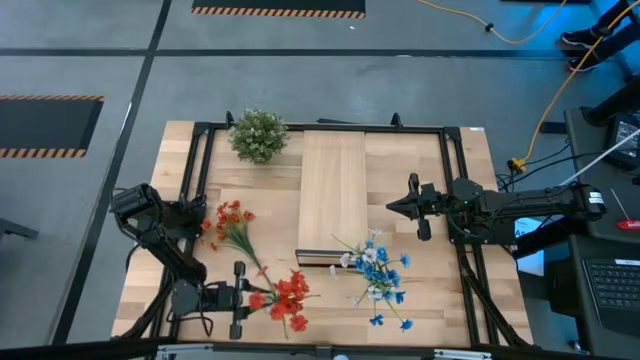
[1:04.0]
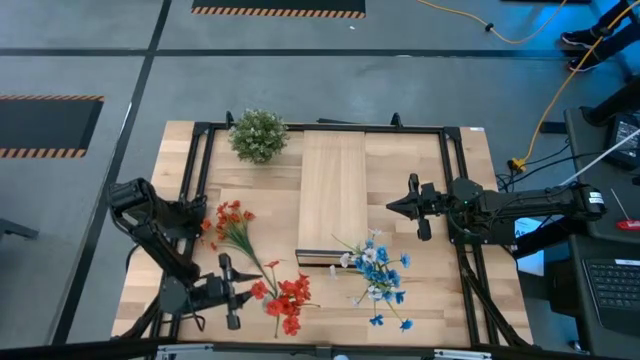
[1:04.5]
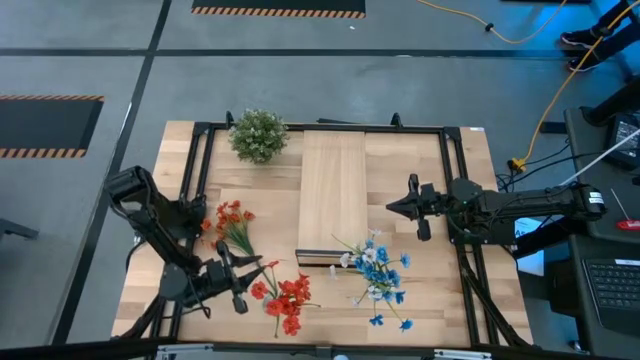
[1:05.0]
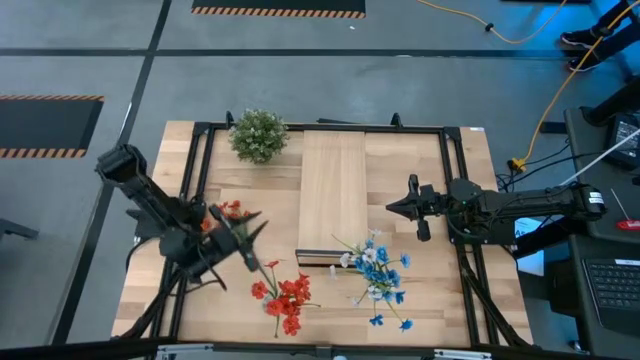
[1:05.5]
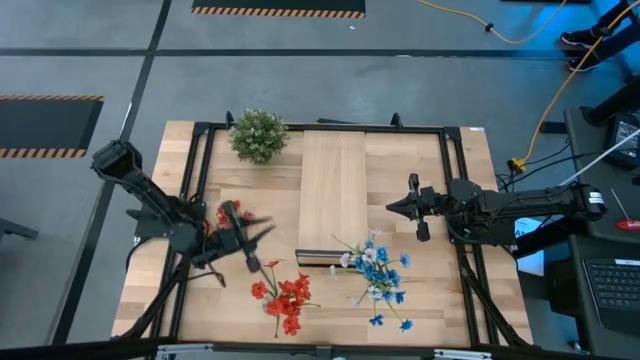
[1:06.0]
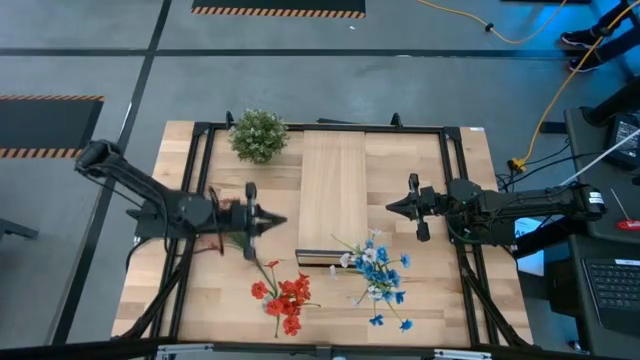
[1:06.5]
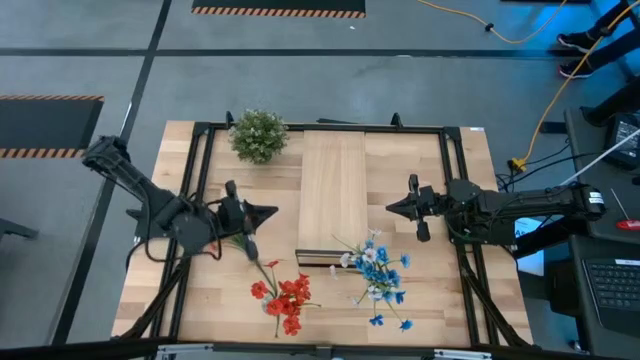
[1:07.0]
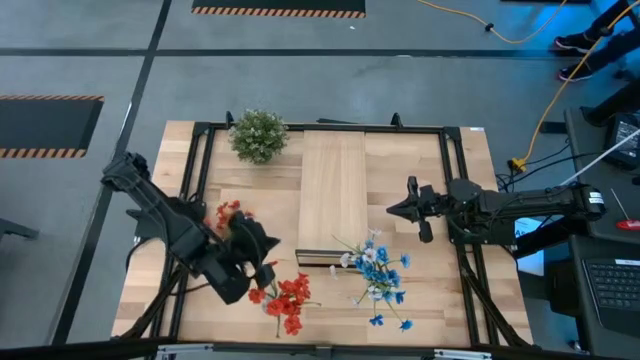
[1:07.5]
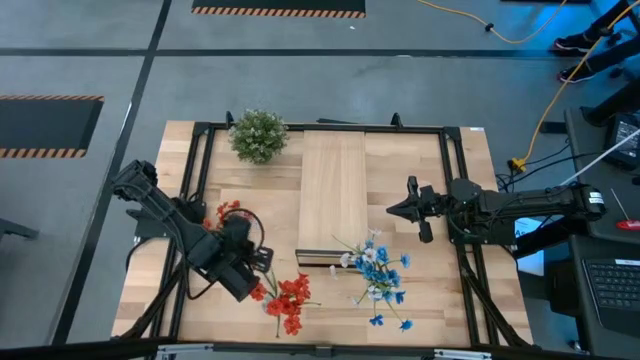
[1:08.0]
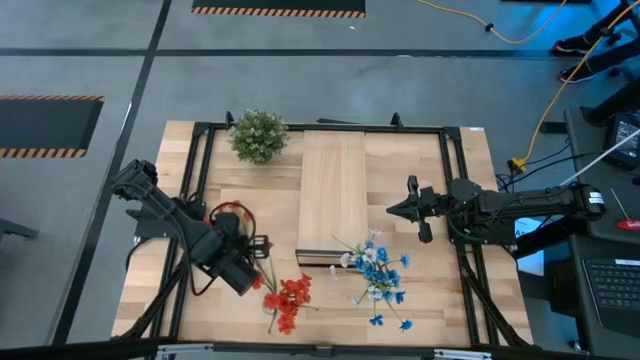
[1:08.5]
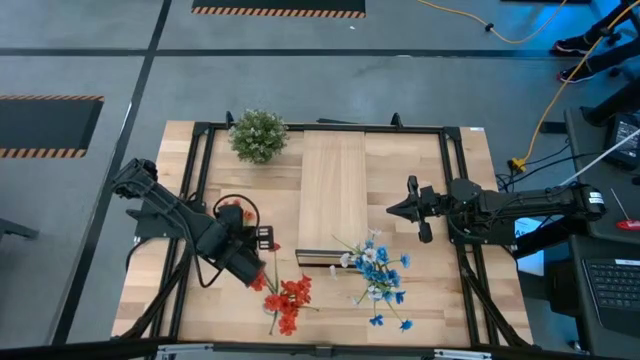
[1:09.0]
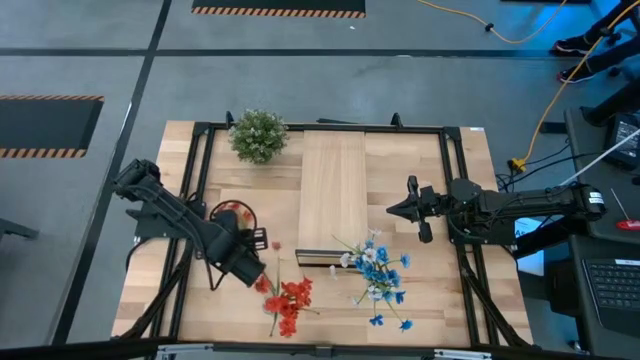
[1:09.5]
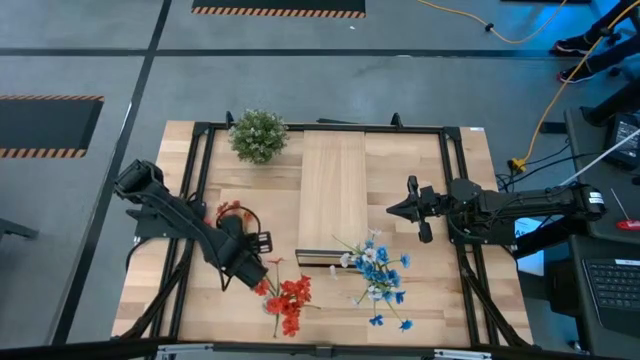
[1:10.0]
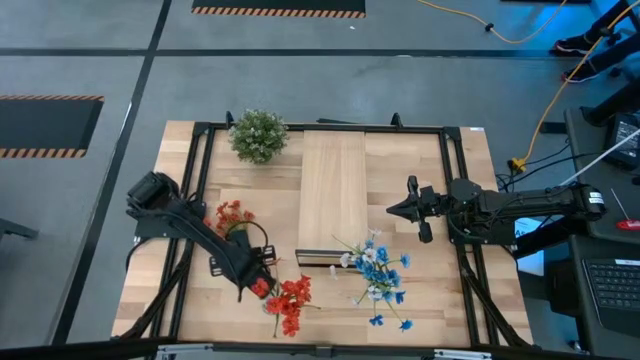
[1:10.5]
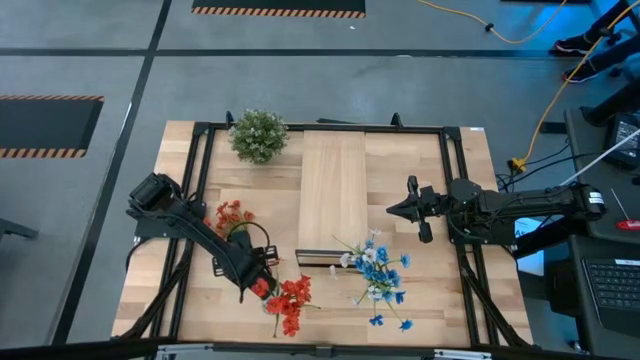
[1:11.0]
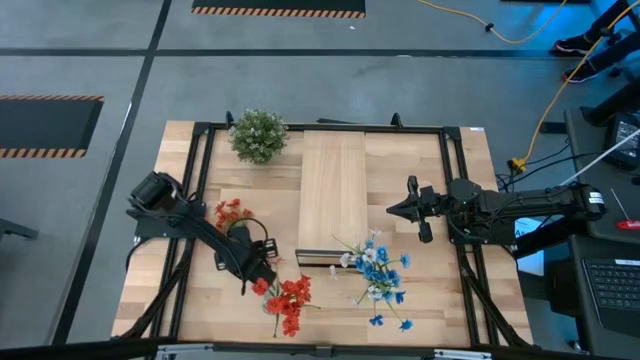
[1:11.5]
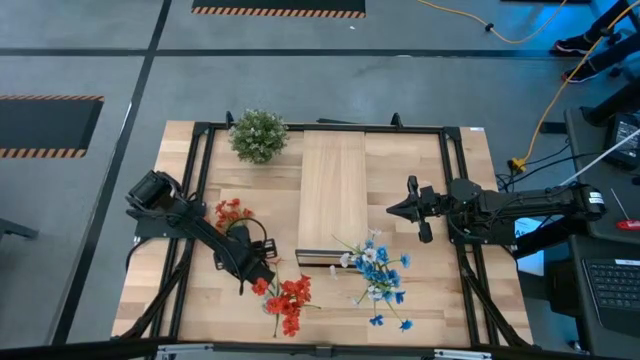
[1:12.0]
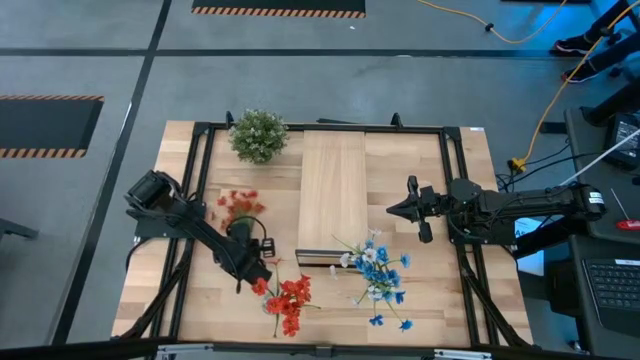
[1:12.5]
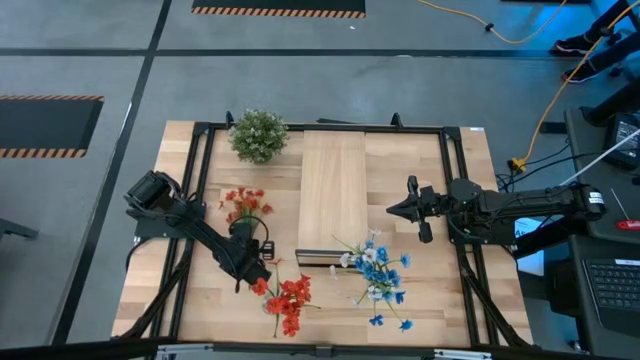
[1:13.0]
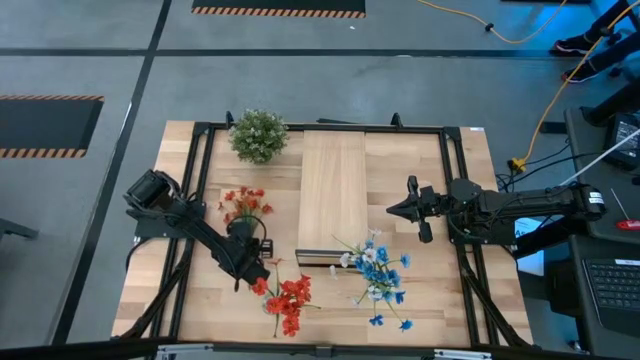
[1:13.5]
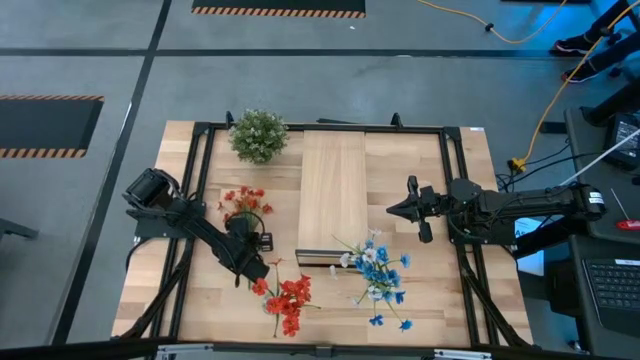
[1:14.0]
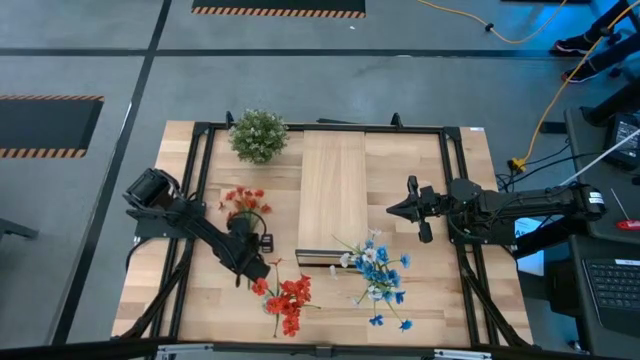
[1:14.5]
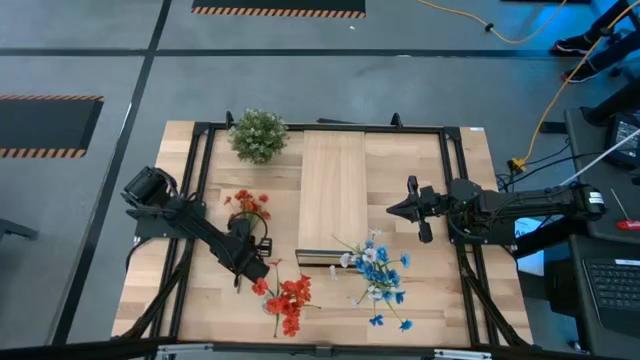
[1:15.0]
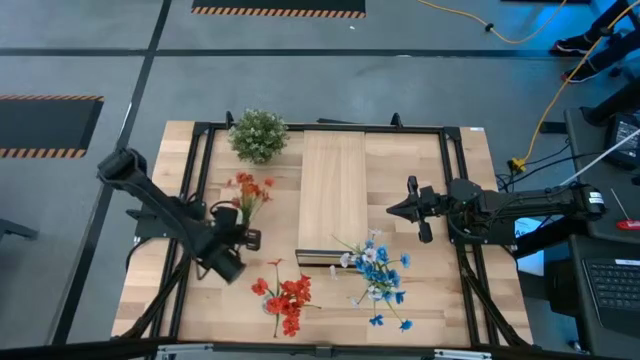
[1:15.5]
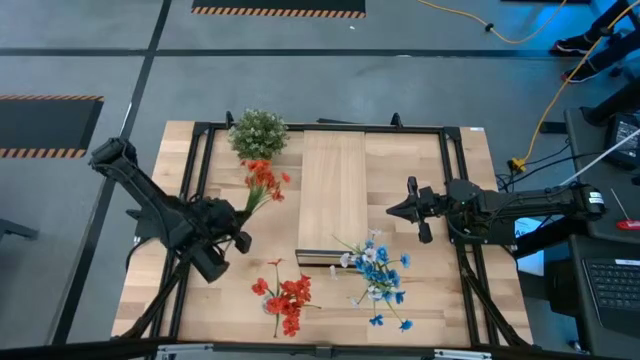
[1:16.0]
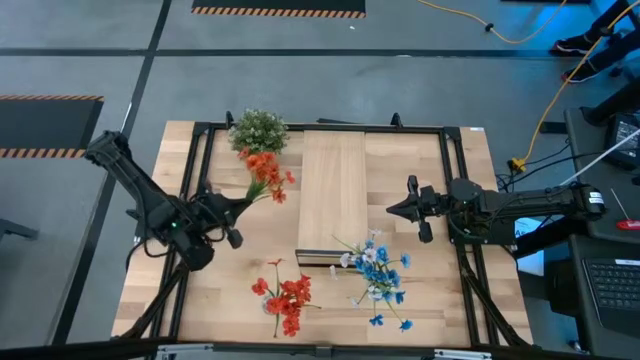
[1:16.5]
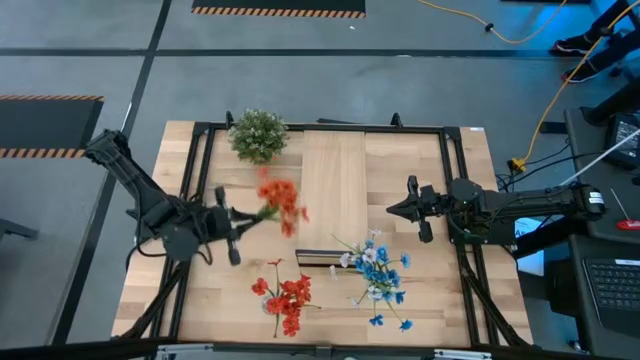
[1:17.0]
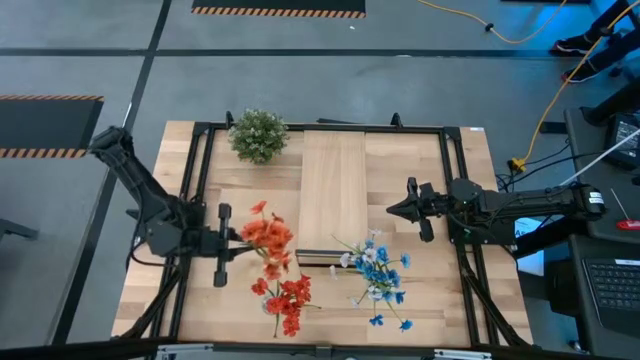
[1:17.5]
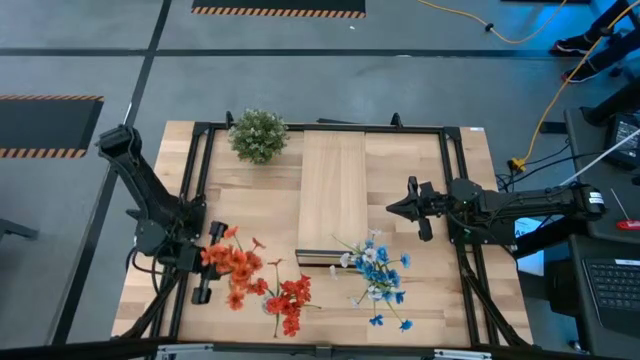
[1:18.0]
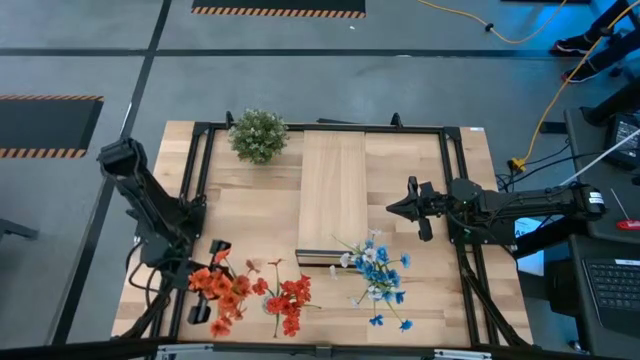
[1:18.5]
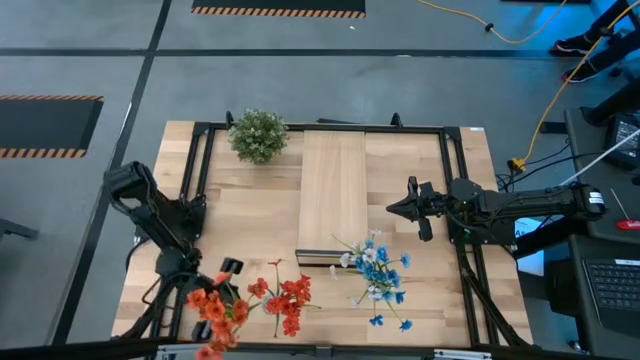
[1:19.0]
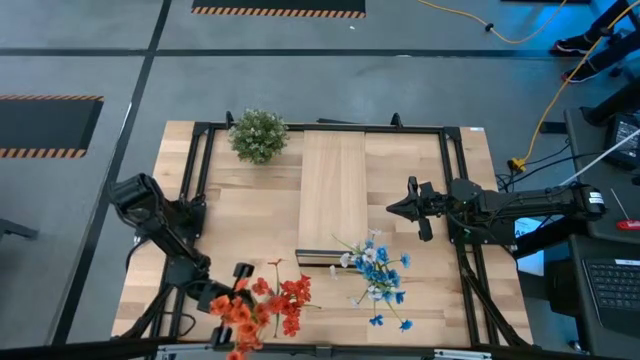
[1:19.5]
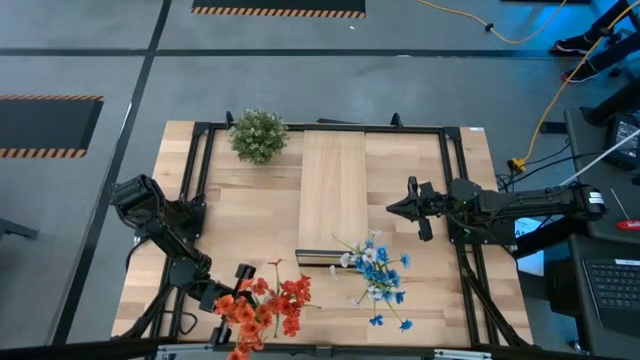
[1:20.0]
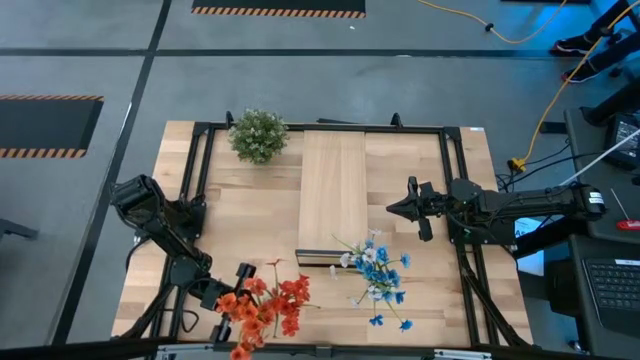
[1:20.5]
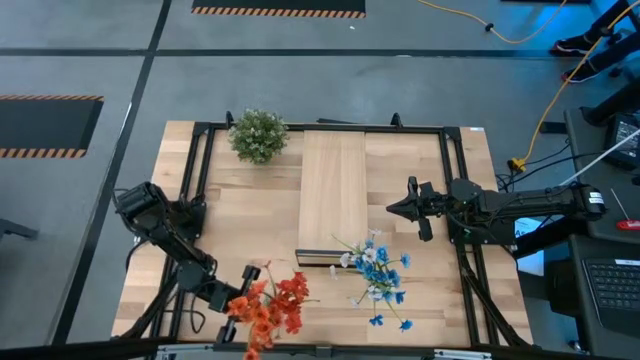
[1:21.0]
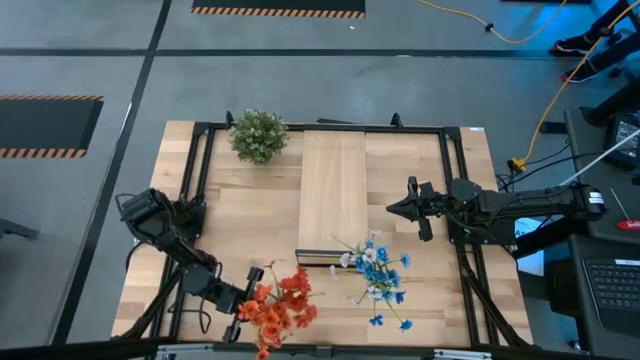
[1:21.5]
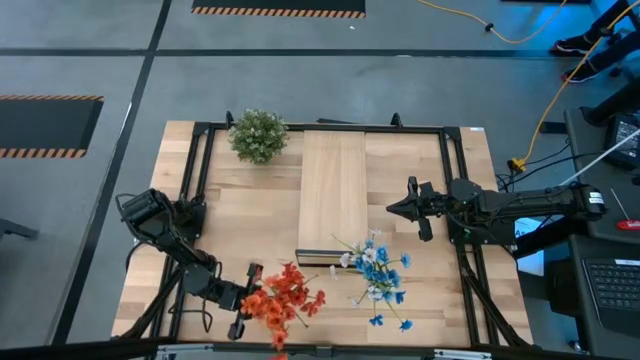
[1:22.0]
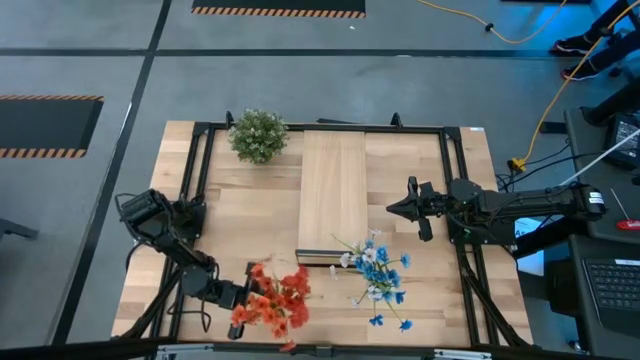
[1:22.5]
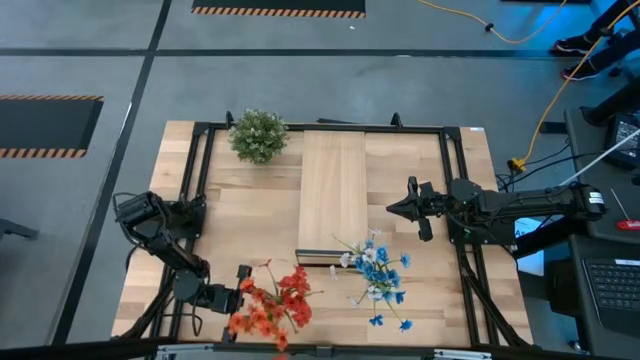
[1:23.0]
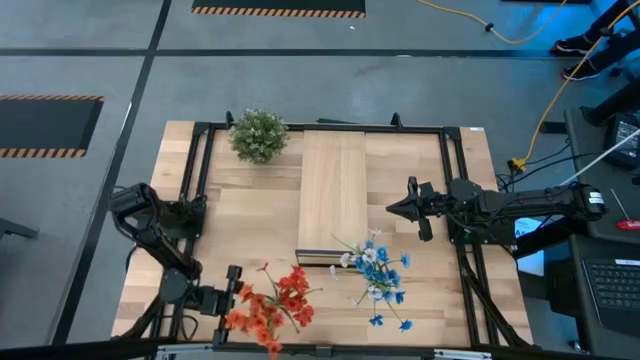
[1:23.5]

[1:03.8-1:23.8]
Task: Pick and place flowers into a vace then onto a shelf
Put the orange flowers into the left transparent flower vase

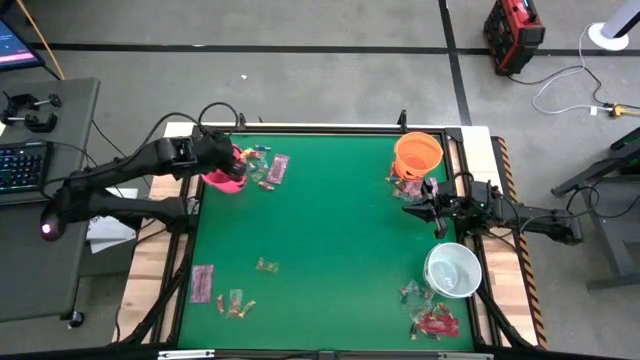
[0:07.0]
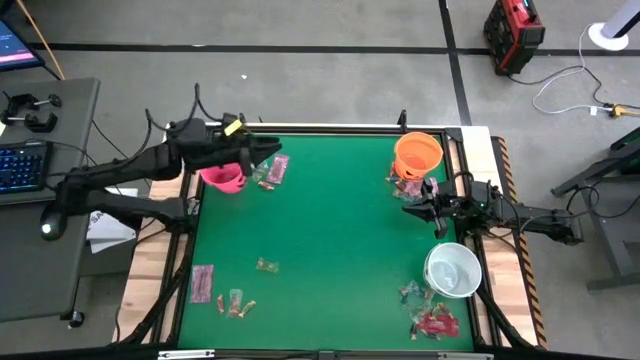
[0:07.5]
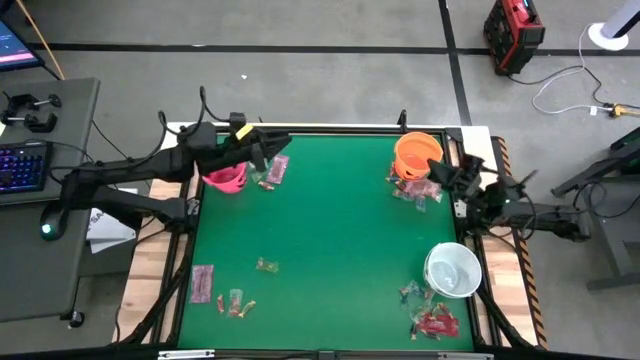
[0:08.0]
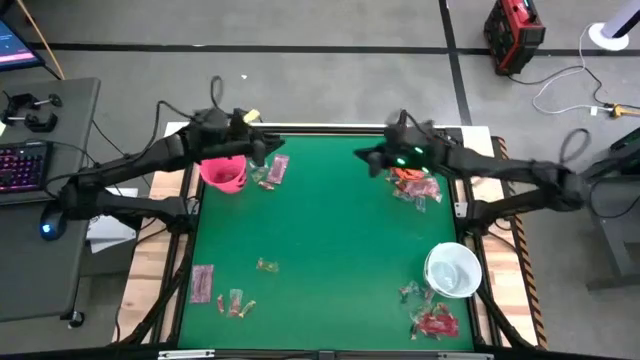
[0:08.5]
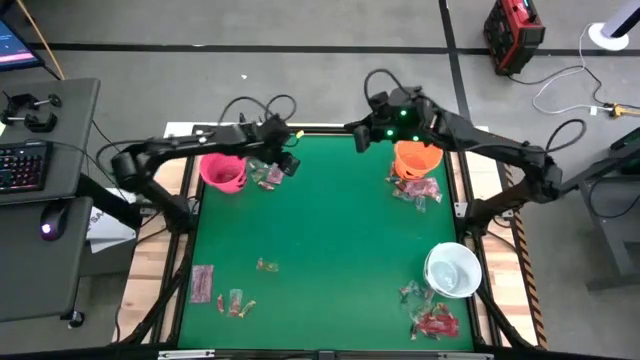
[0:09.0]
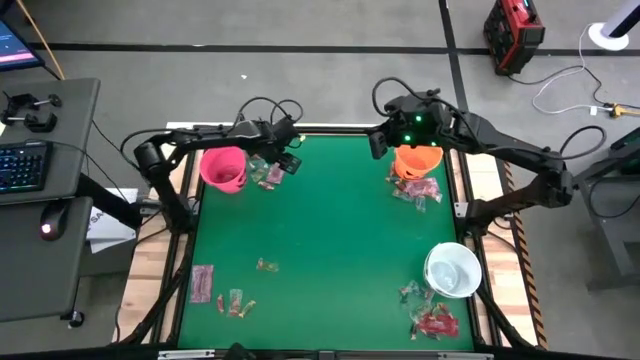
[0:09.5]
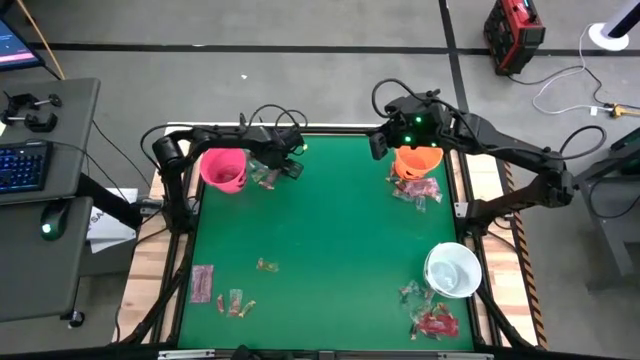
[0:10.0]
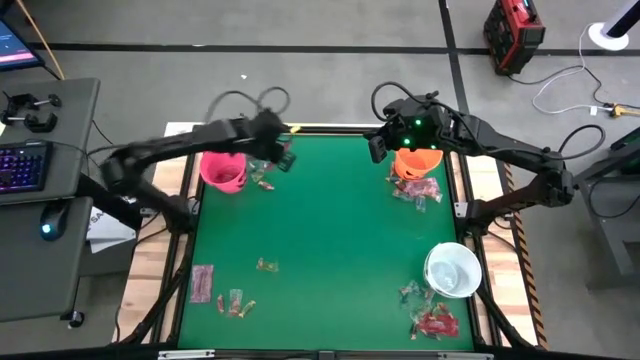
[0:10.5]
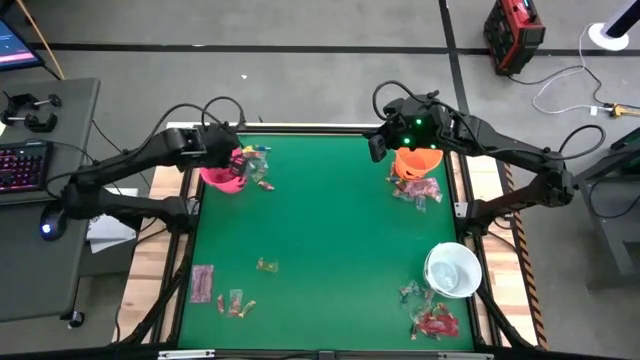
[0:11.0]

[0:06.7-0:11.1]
Task: Sort candy by brand, put in halloween buckets
Put the red candy into the pink bucket
